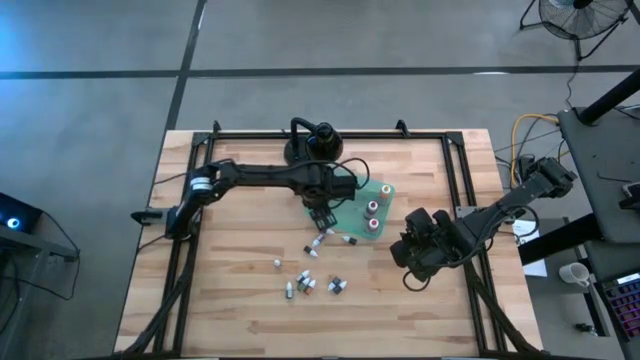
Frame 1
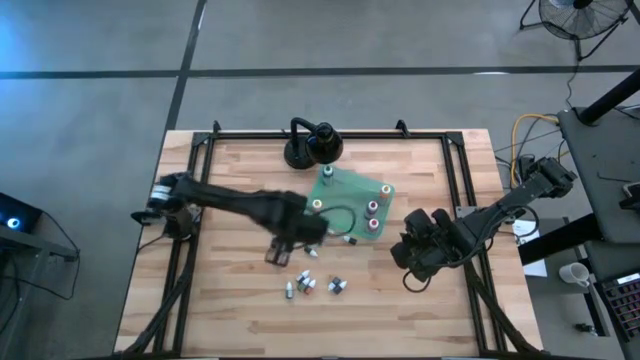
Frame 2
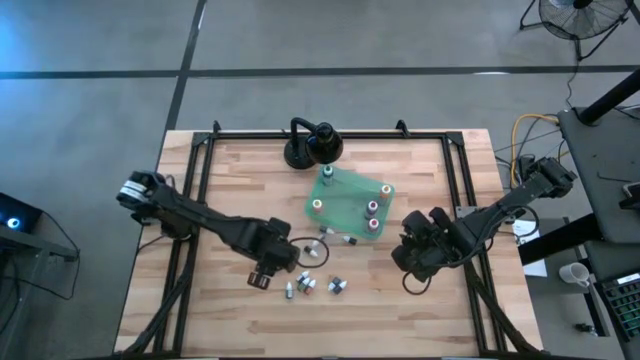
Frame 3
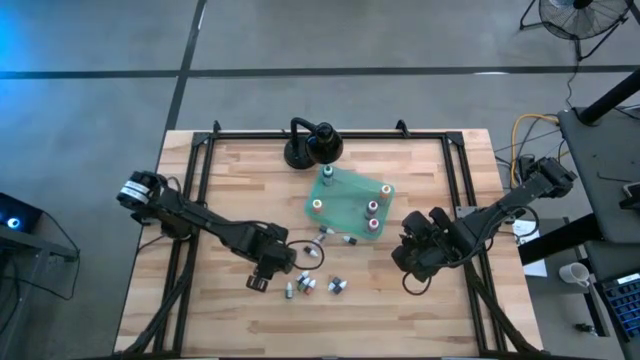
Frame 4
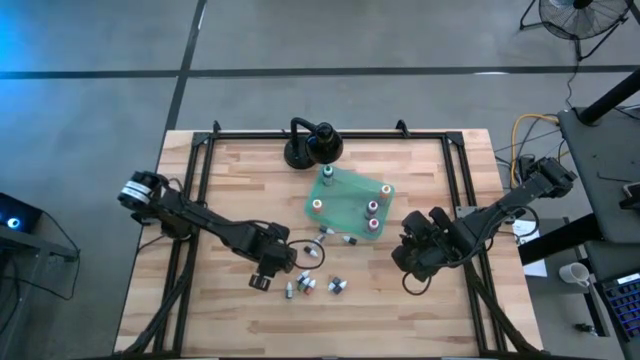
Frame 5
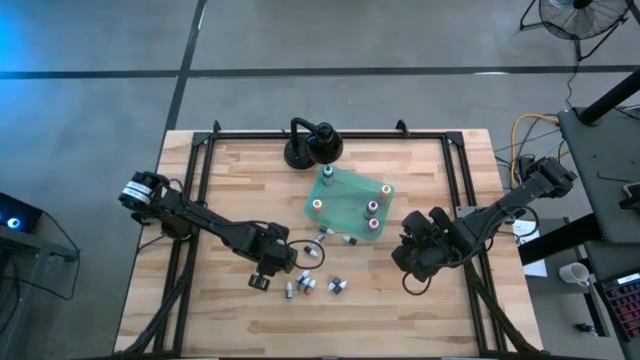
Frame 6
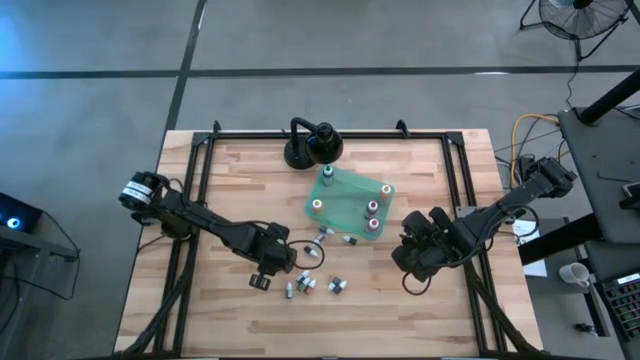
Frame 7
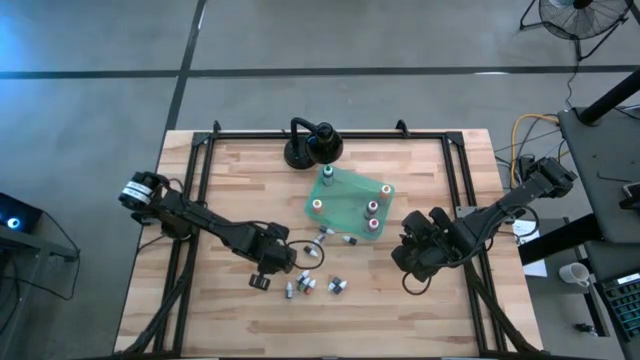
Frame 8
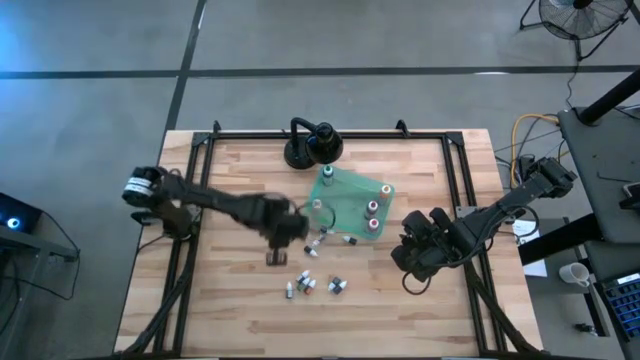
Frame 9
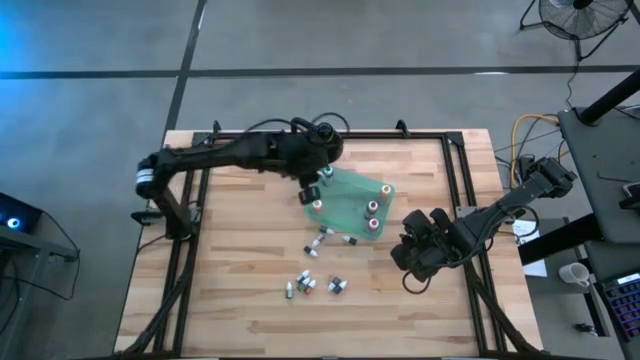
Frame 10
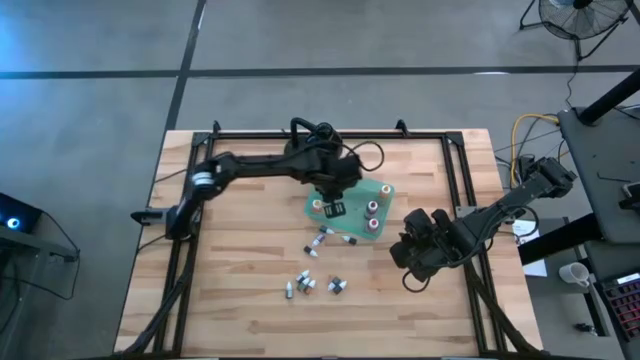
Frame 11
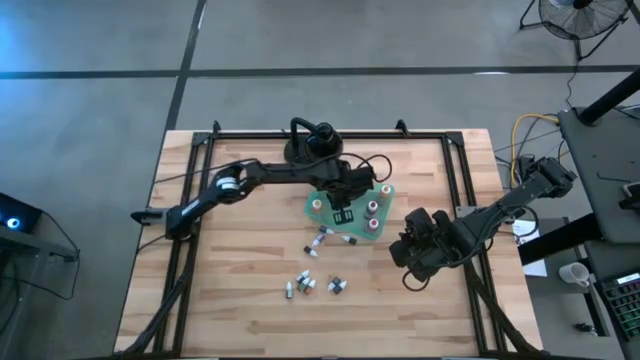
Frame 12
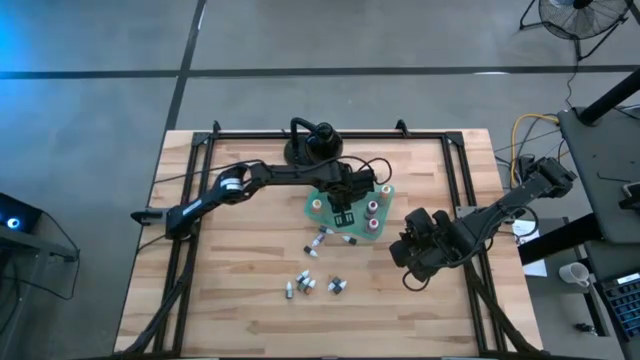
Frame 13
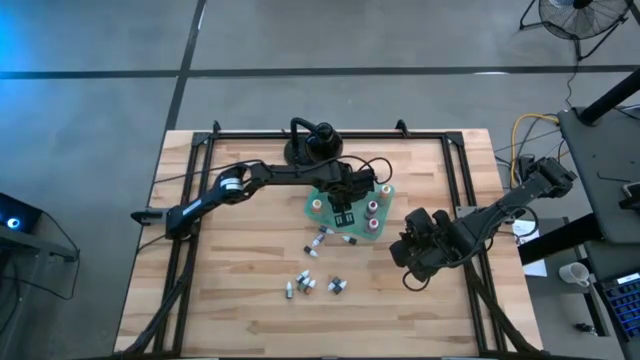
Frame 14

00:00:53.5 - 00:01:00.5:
Task: Pick & Place food coloring
Put the small red food coloring bottle into the bin

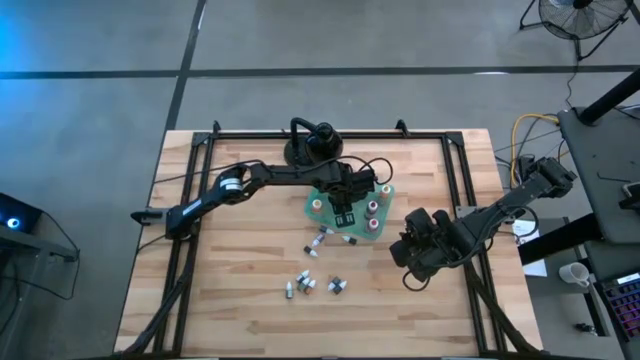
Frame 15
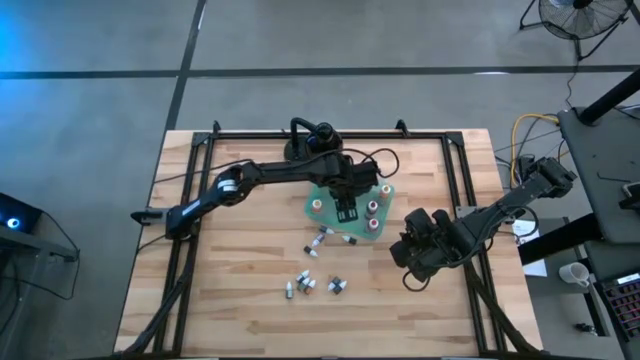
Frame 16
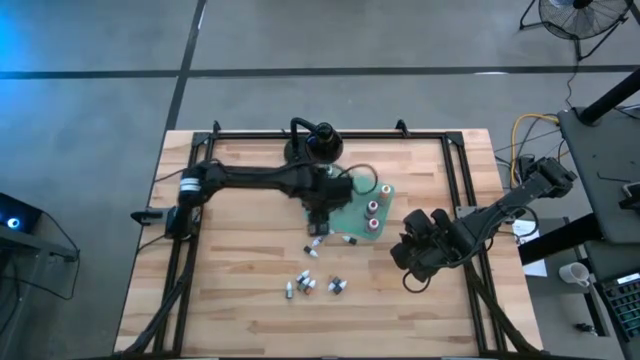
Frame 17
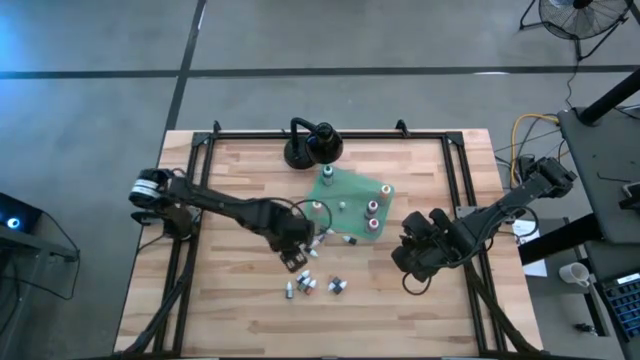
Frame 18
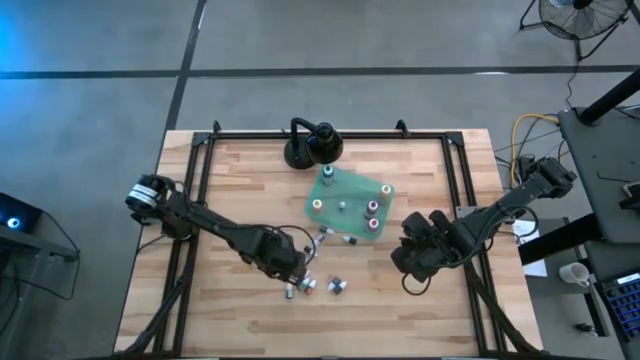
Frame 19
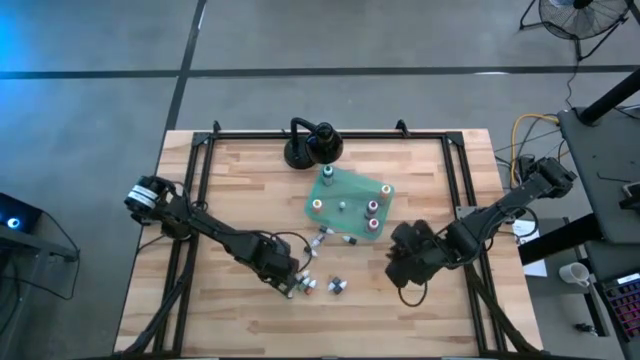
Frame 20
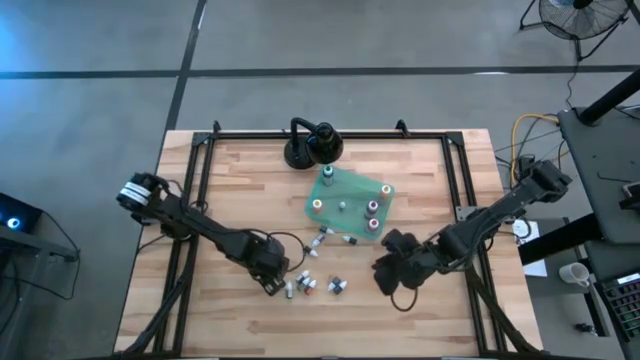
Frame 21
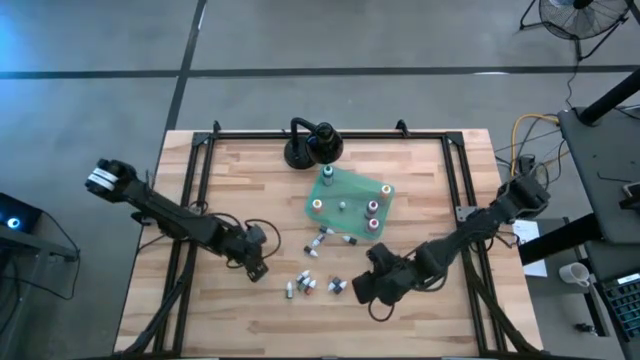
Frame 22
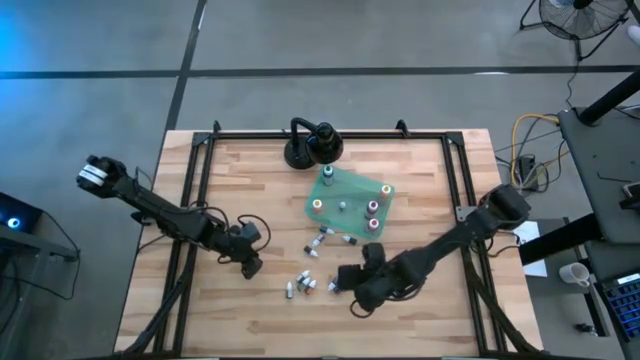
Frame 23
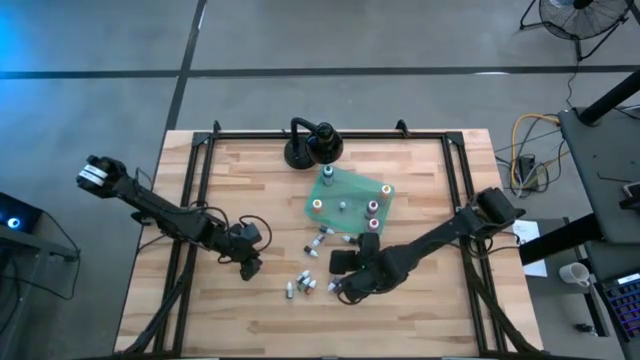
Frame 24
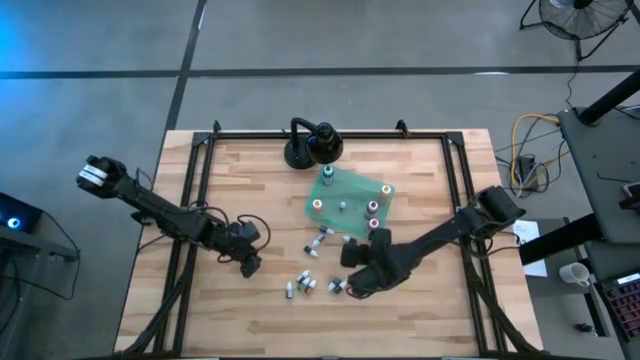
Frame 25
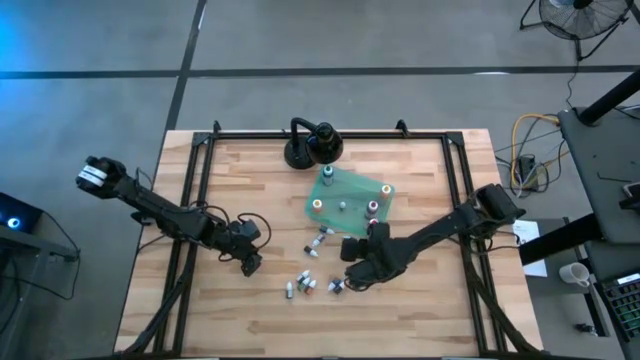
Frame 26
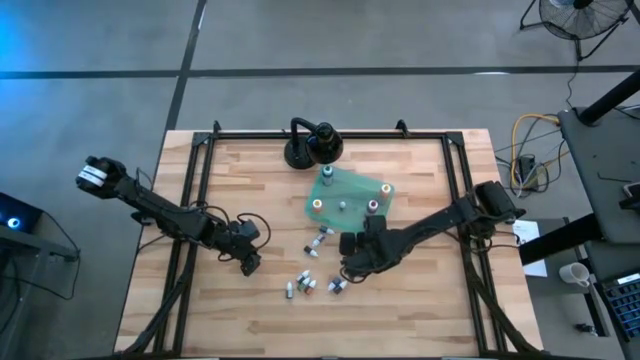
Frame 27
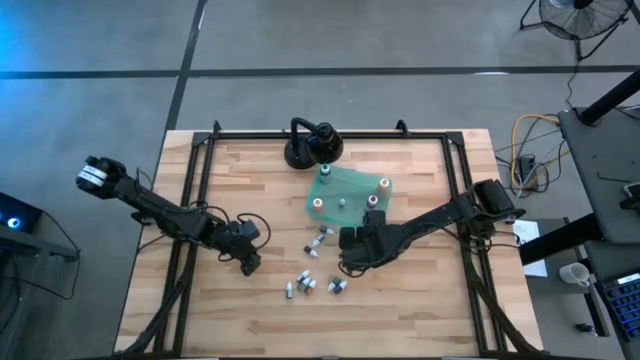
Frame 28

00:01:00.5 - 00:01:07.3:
Adjust the green bin on the table

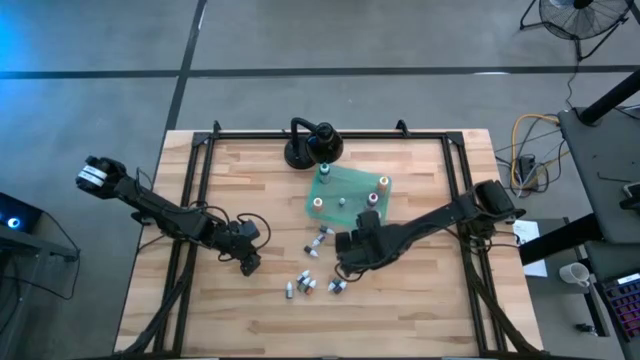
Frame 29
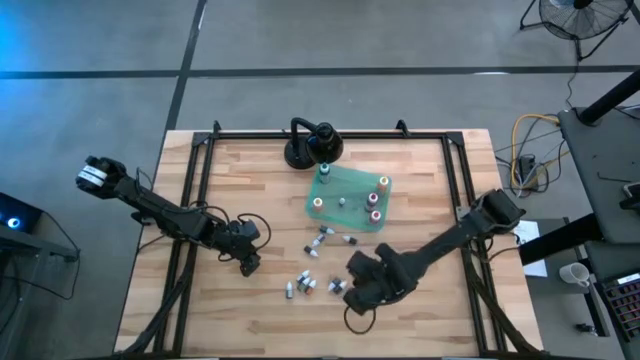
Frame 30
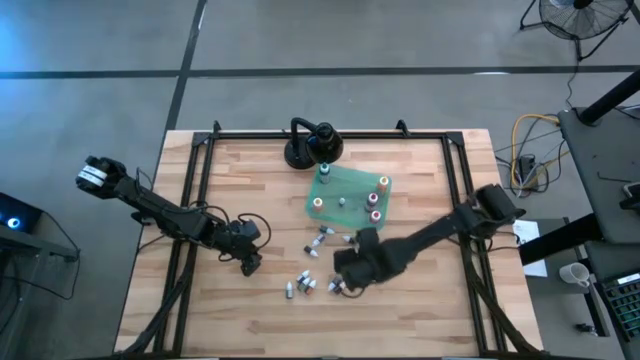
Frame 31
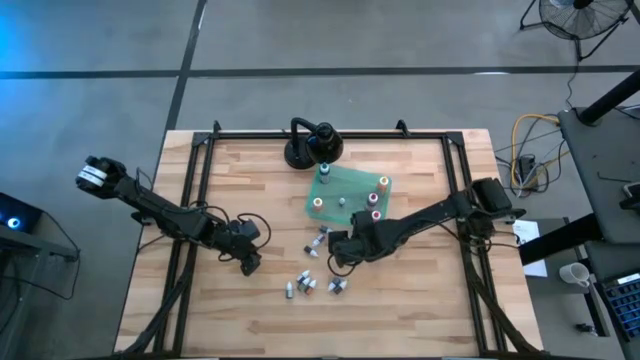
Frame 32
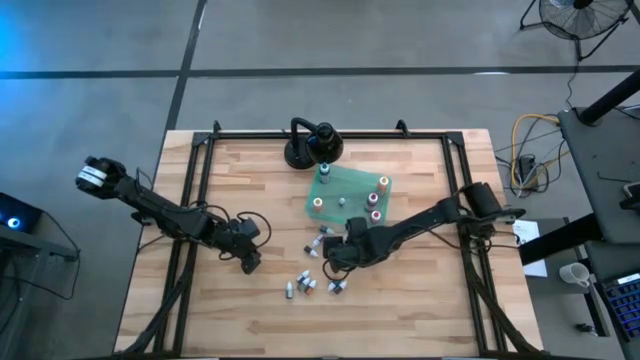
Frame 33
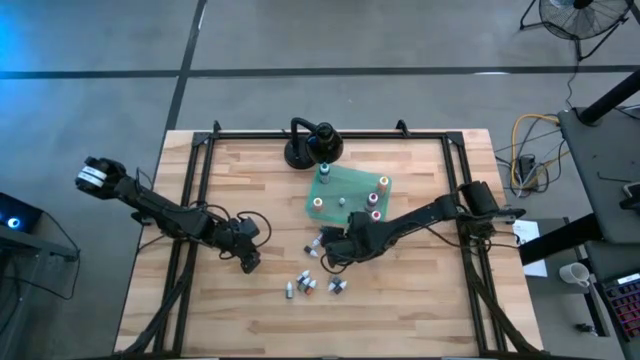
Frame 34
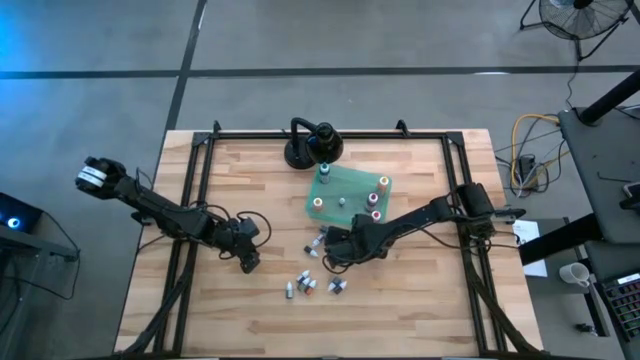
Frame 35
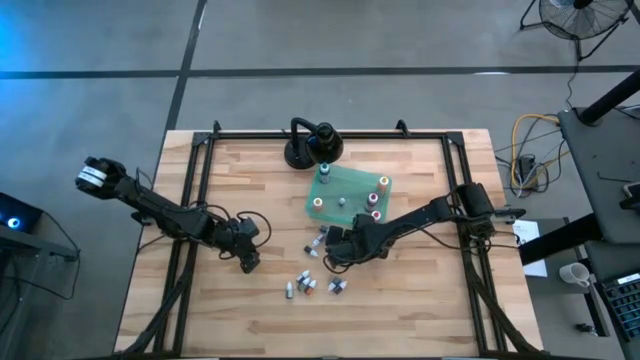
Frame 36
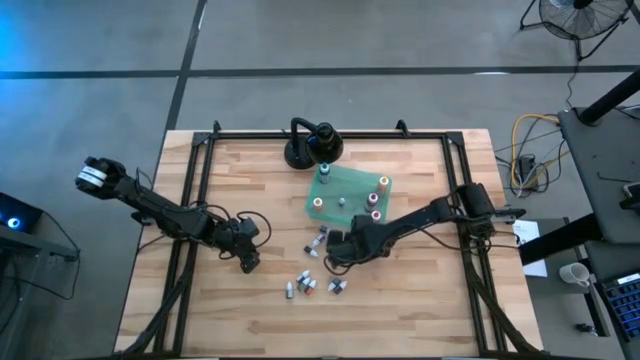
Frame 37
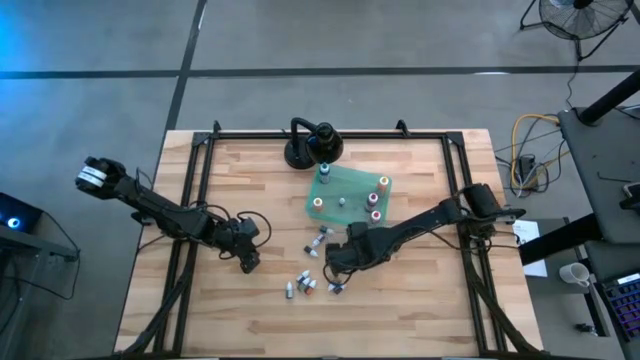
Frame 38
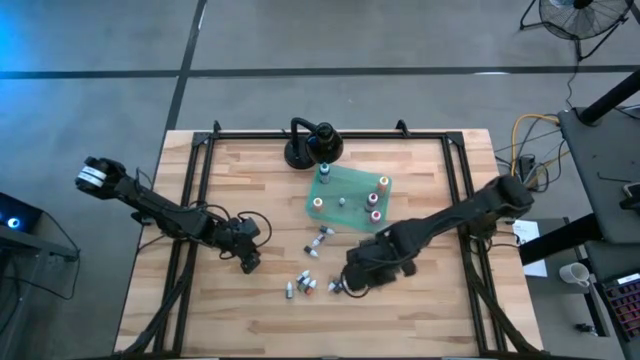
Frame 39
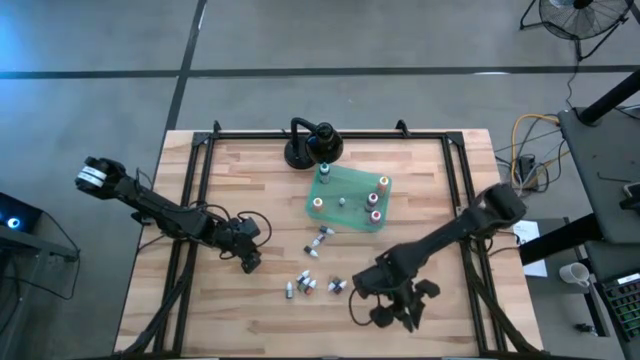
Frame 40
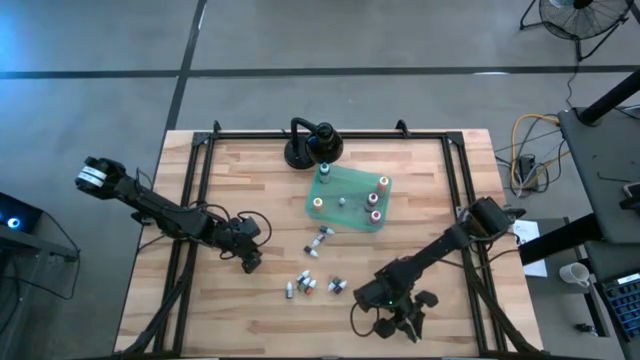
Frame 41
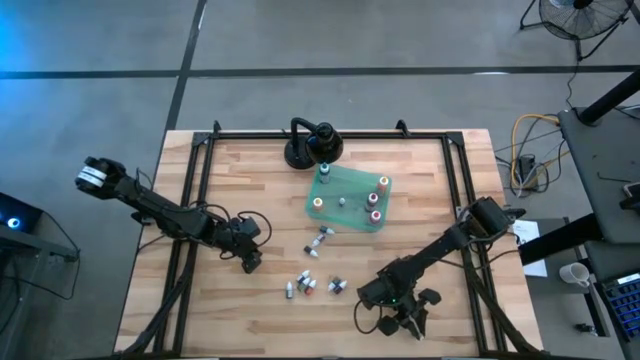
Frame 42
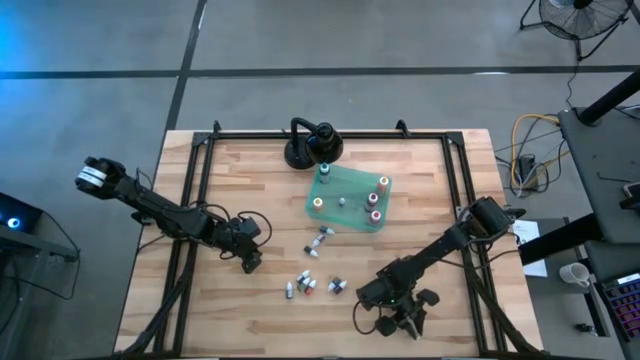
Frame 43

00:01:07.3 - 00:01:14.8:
Move the green food coloring bottle to the bottom right of the table
